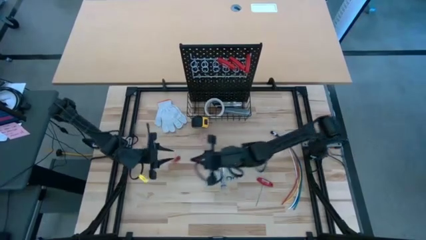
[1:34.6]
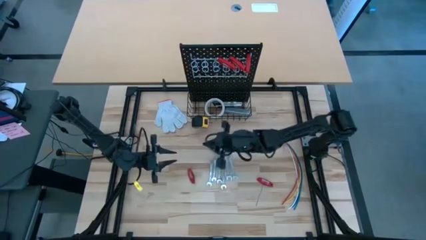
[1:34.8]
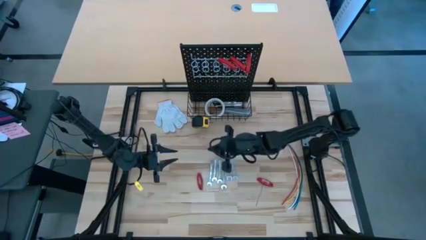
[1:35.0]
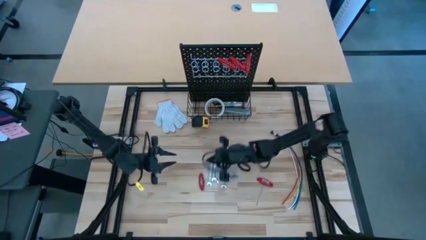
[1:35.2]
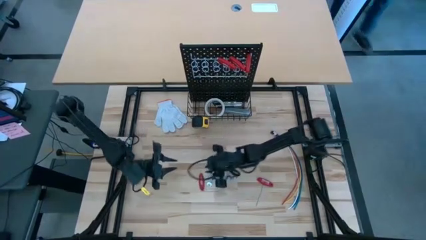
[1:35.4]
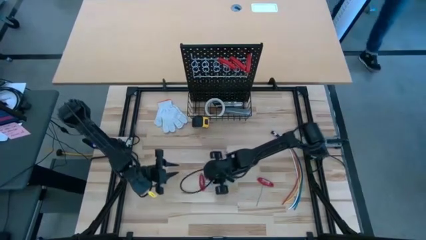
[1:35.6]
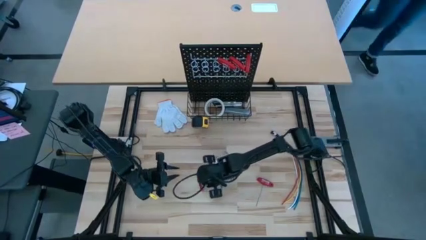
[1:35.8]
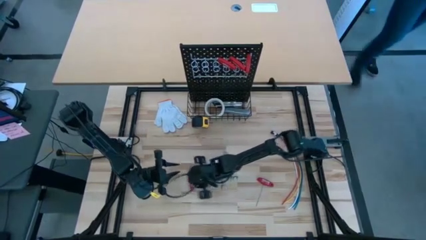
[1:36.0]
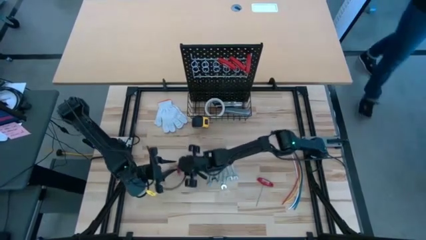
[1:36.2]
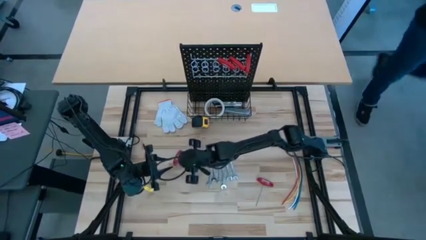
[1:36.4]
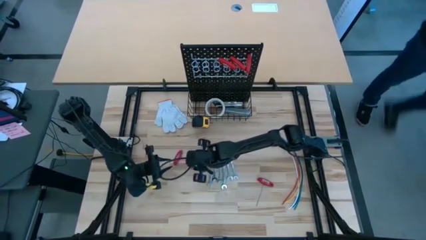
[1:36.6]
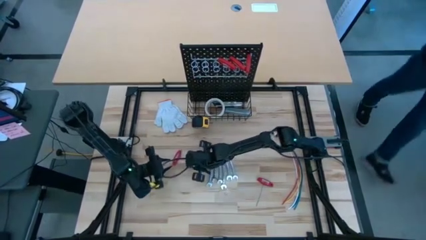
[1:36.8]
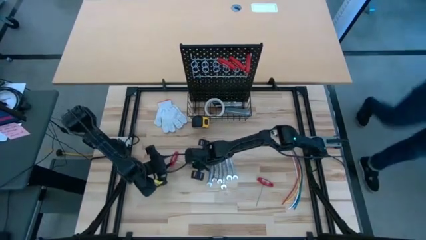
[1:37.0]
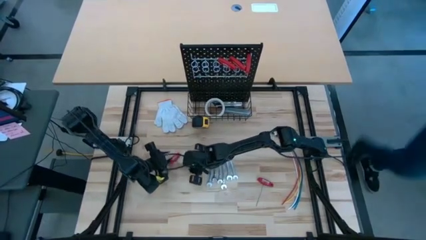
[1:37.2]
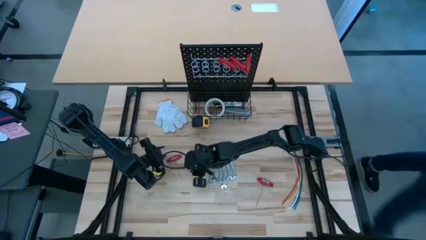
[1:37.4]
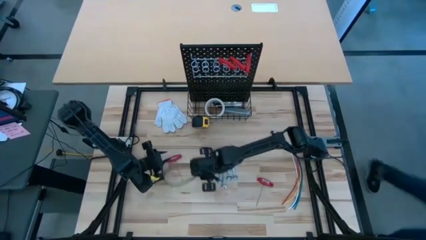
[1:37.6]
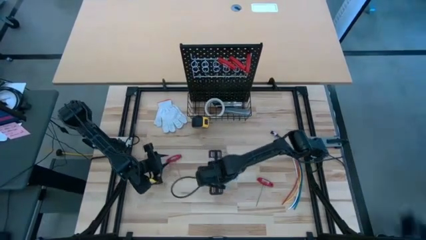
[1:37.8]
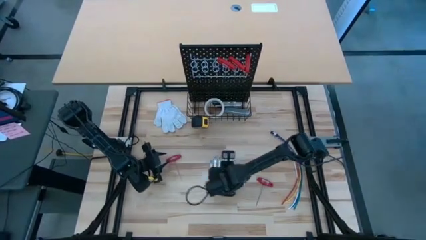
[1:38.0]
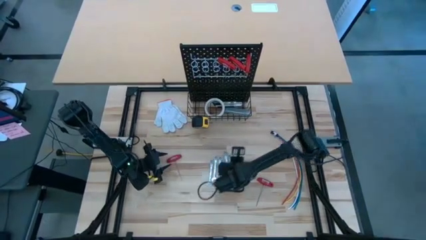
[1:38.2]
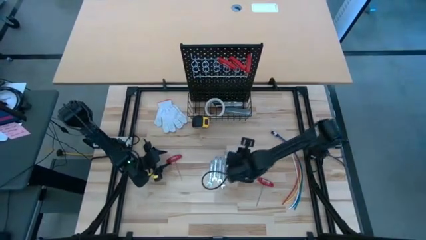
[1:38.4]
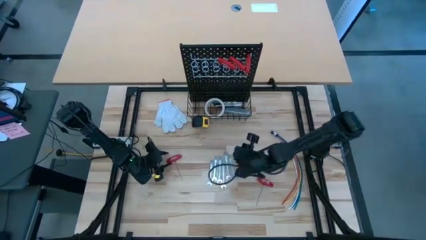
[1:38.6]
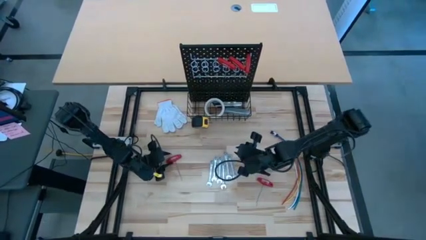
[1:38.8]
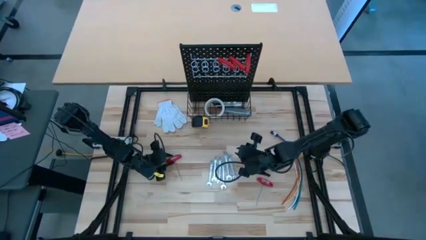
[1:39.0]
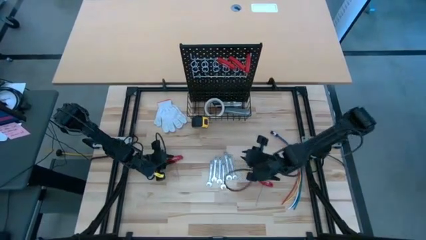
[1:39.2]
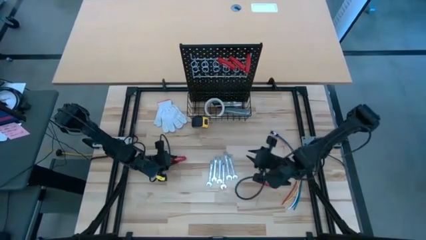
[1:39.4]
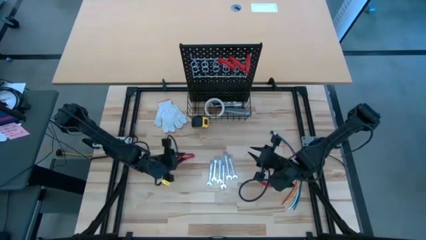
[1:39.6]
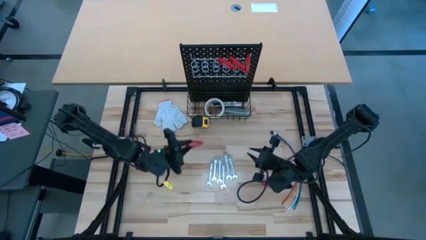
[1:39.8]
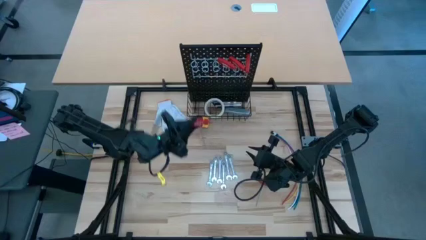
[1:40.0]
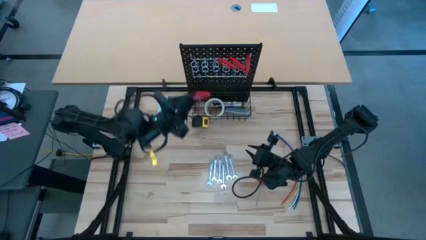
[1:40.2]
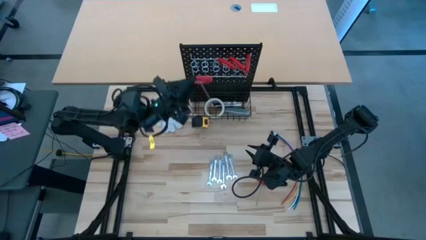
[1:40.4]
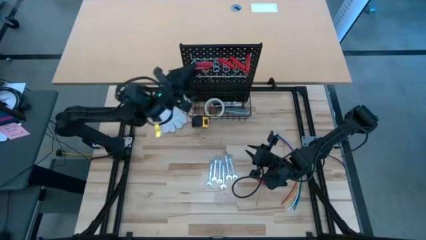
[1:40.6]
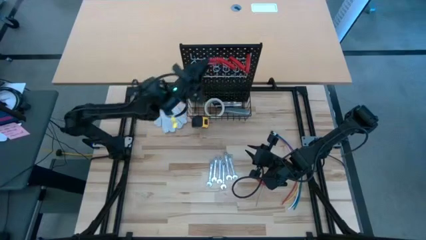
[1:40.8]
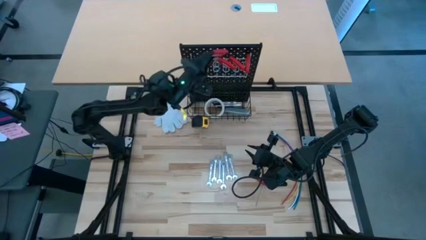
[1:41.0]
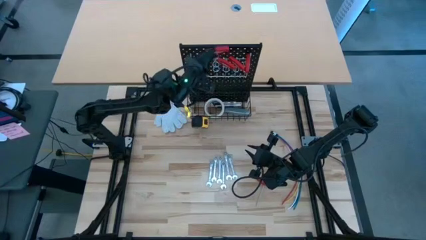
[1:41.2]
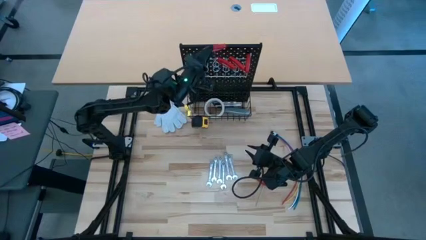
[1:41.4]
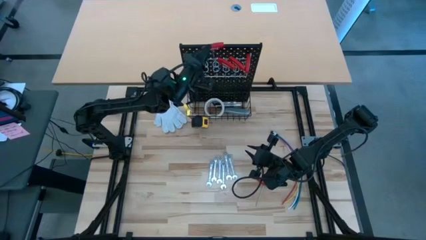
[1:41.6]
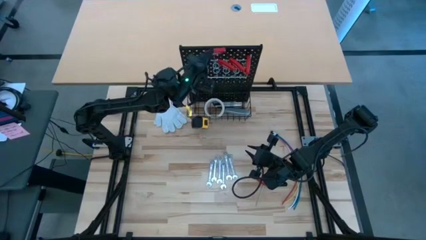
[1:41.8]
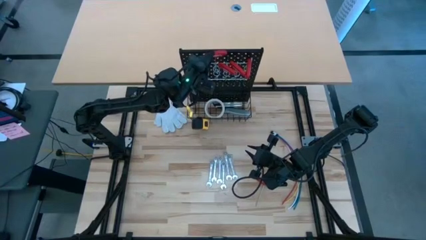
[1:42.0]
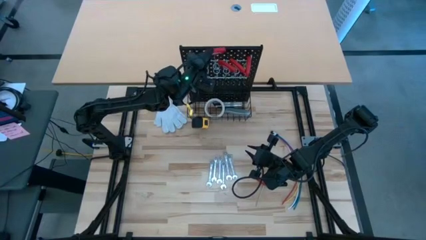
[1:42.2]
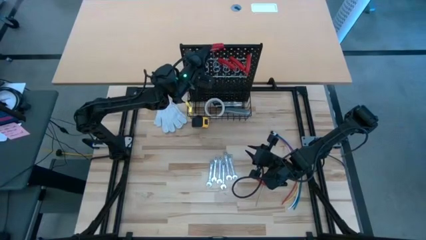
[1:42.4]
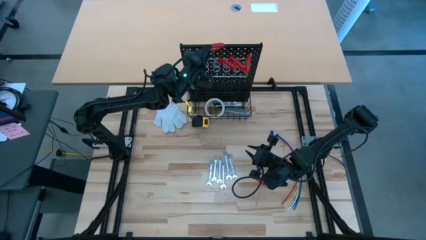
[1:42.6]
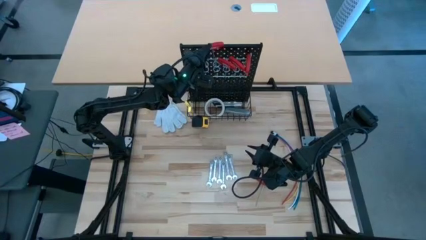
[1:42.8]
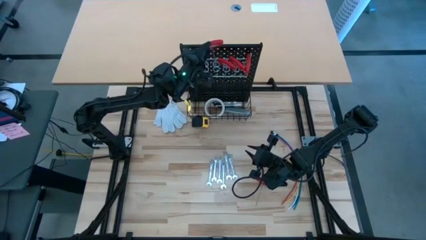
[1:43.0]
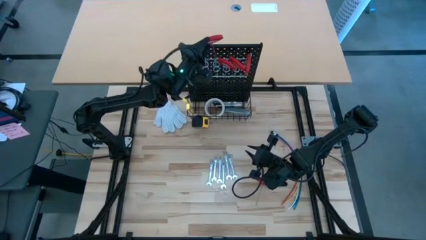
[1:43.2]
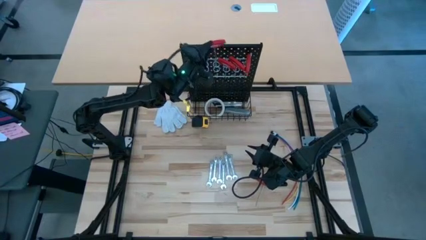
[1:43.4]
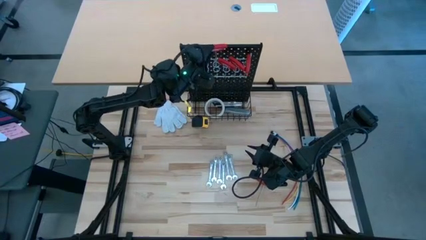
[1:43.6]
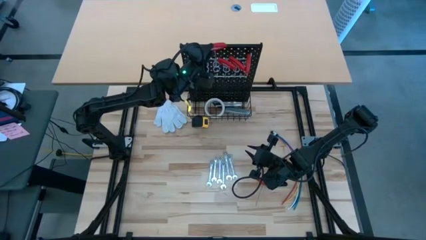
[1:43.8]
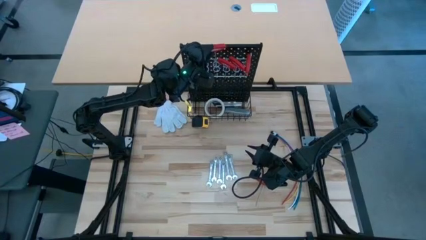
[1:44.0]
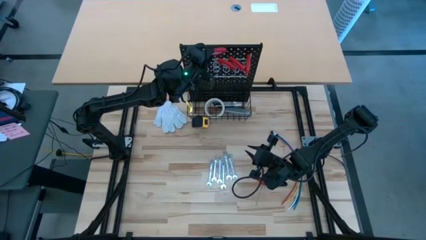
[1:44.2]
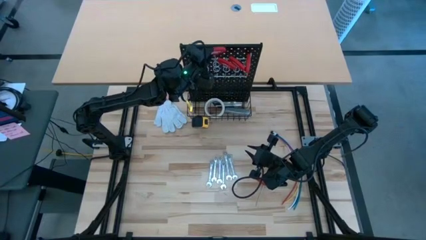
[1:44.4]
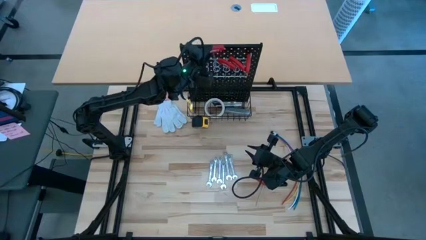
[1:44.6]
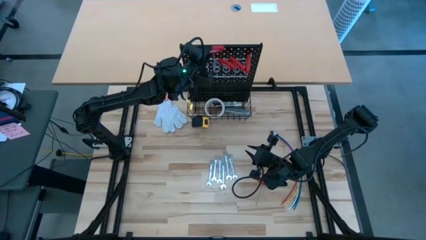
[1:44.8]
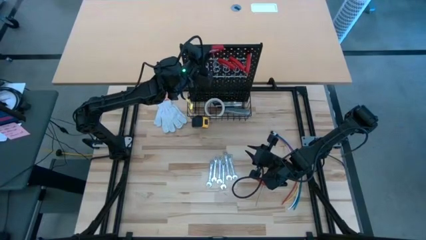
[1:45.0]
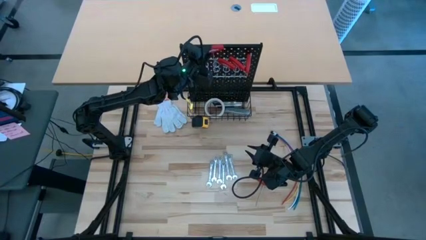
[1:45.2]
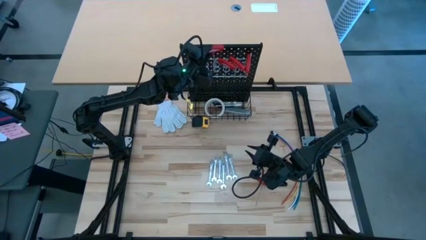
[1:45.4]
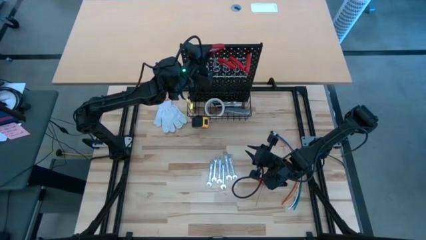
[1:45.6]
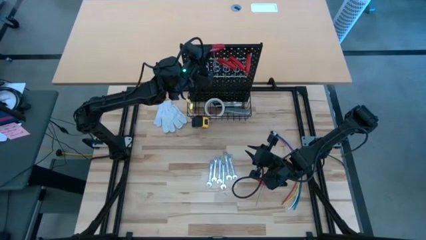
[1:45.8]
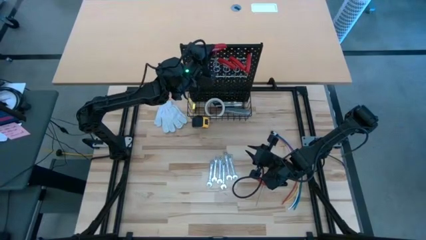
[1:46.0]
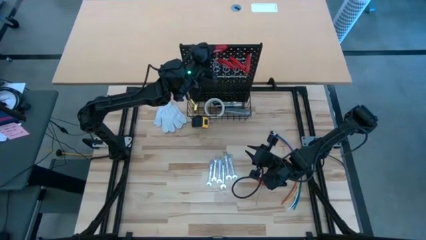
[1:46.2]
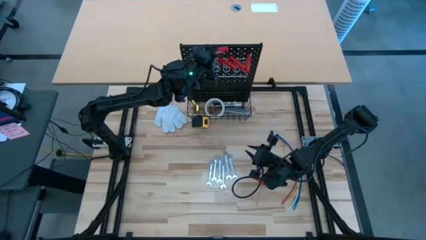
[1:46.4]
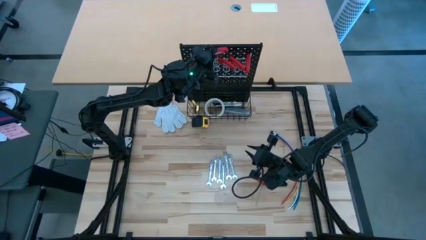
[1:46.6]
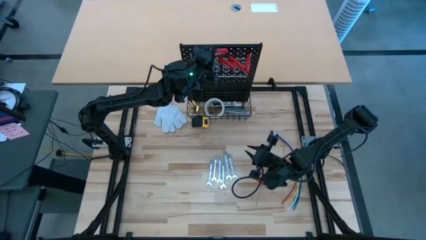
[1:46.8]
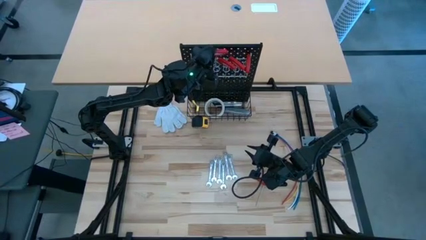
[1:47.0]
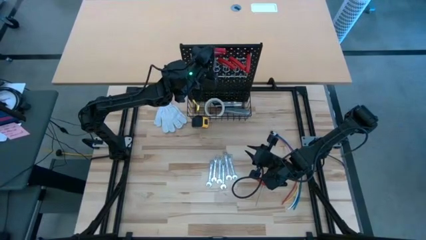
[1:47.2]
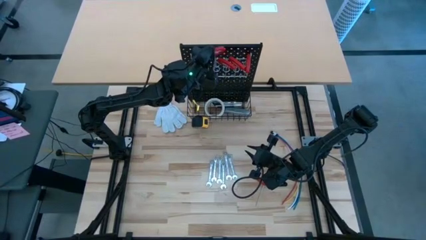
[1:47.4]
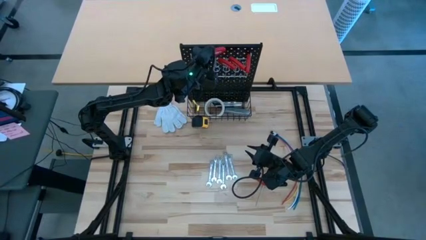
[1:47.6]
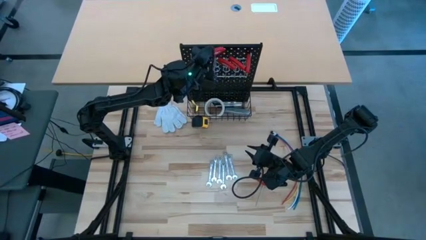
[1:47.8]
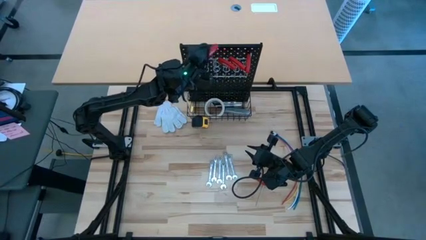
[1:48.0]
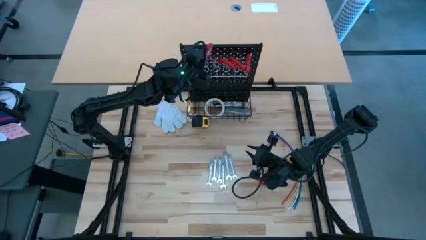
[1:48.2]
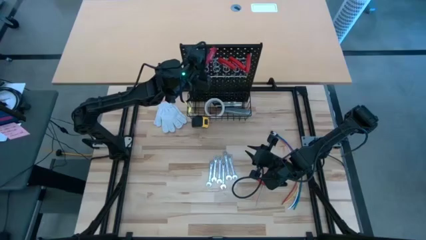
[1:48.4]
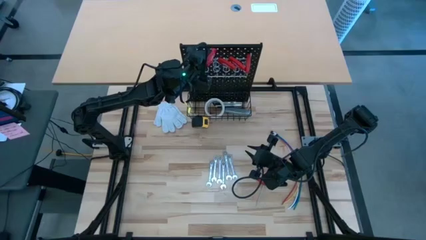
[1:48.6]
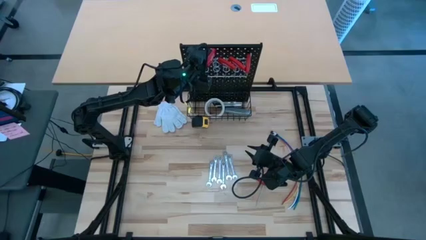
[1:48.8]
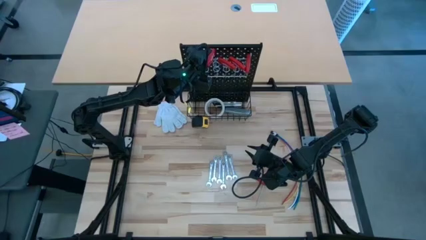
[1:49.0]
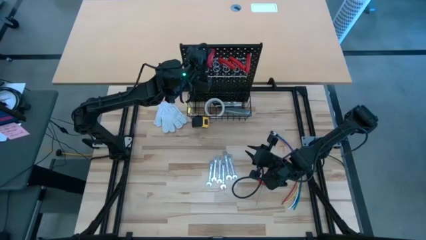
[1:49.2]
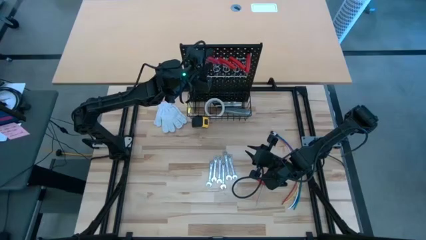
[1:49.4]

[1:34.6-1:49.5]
Task: Hang tools onto peg board
Hang the red Allen wrench on the pegboard
